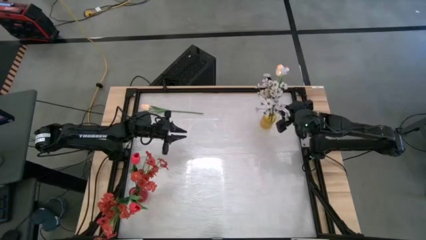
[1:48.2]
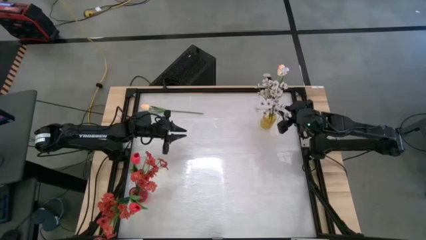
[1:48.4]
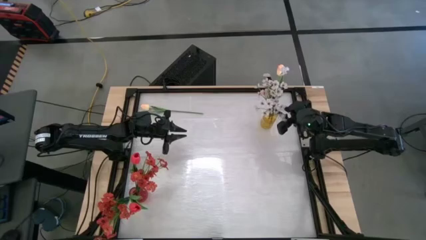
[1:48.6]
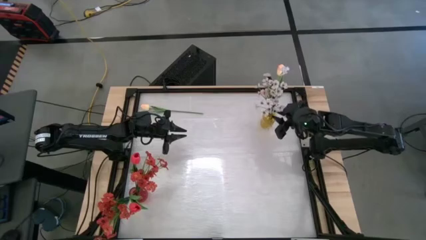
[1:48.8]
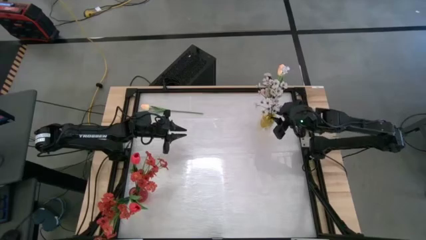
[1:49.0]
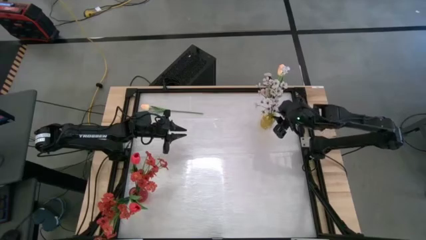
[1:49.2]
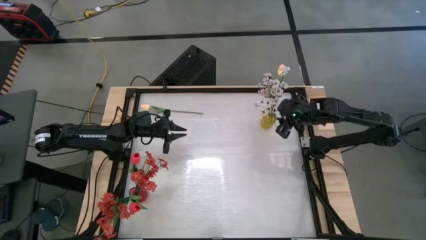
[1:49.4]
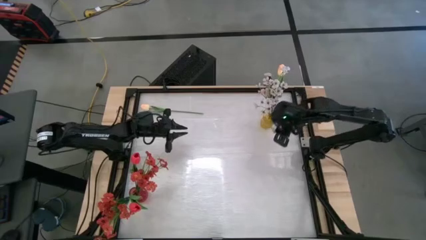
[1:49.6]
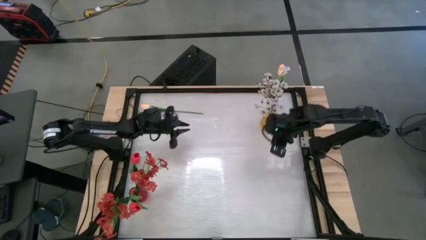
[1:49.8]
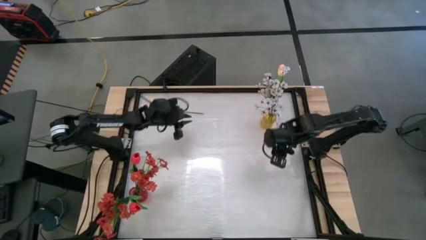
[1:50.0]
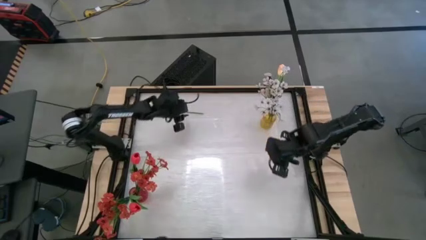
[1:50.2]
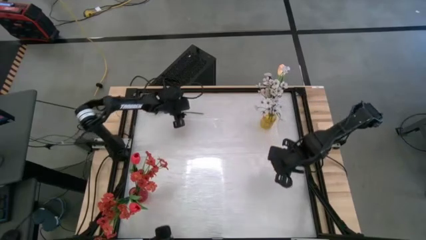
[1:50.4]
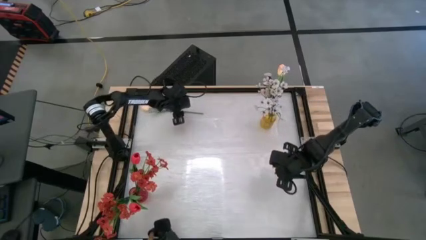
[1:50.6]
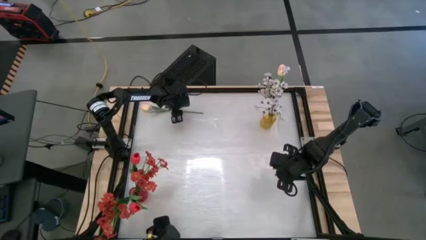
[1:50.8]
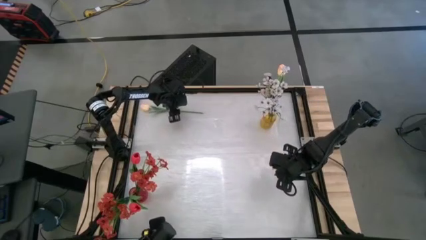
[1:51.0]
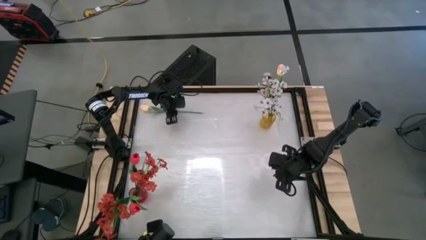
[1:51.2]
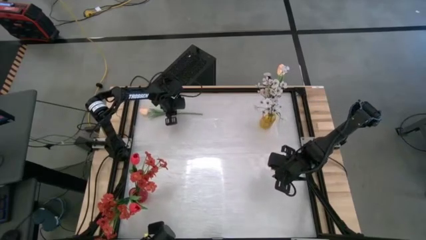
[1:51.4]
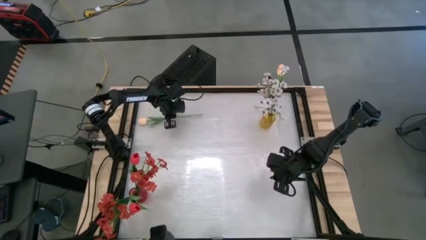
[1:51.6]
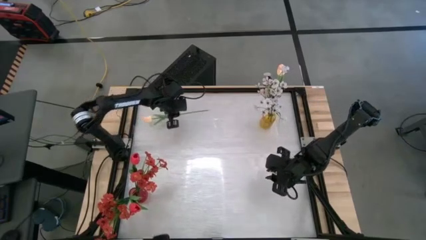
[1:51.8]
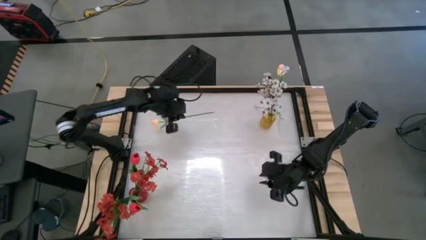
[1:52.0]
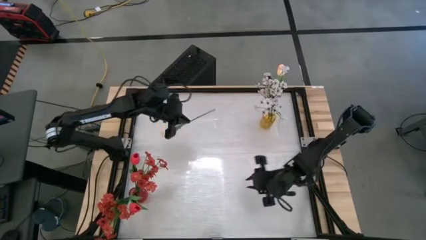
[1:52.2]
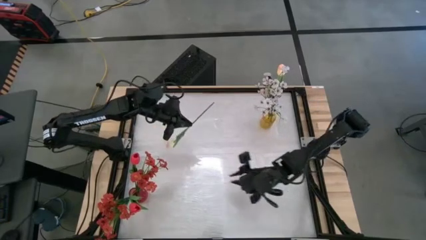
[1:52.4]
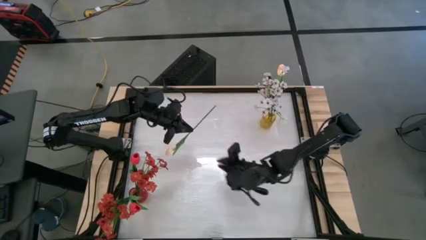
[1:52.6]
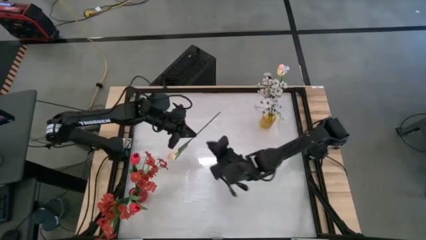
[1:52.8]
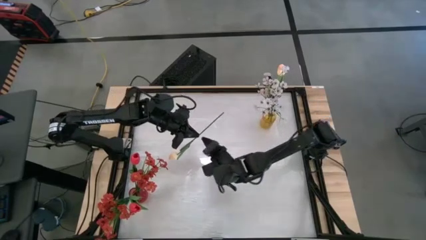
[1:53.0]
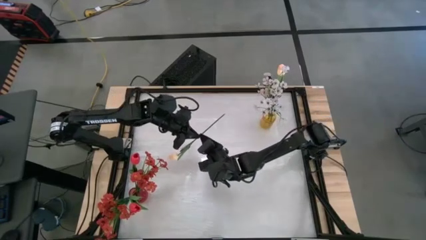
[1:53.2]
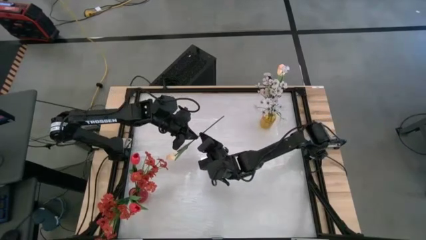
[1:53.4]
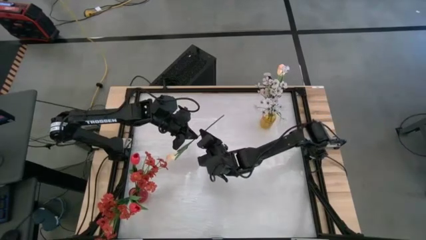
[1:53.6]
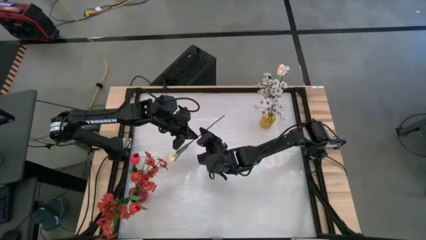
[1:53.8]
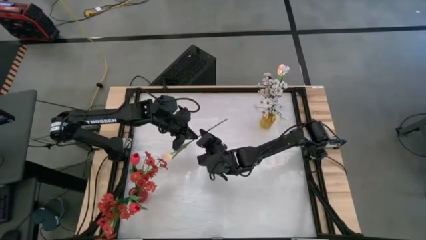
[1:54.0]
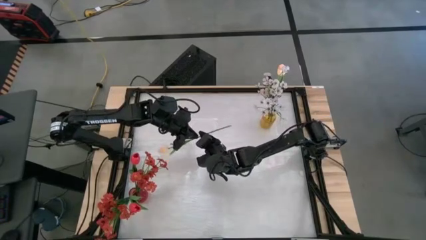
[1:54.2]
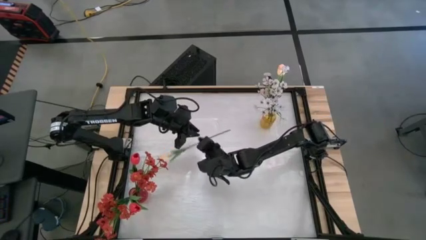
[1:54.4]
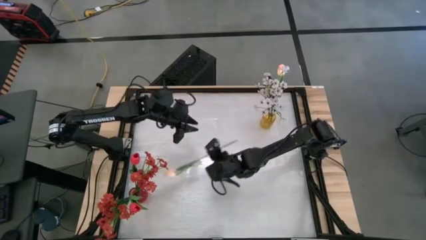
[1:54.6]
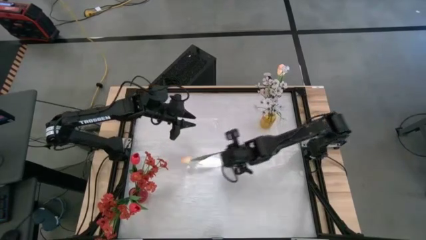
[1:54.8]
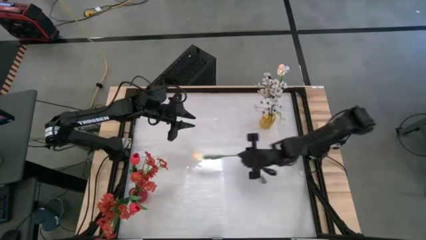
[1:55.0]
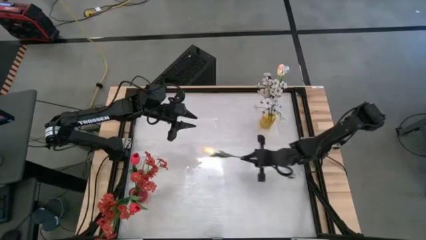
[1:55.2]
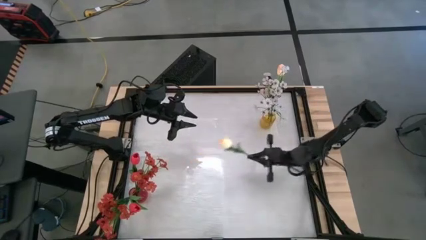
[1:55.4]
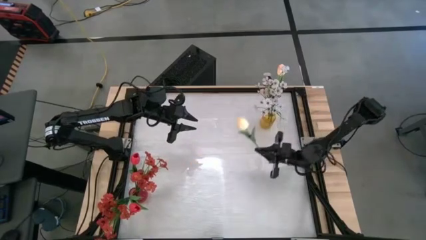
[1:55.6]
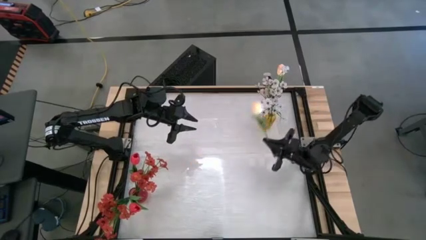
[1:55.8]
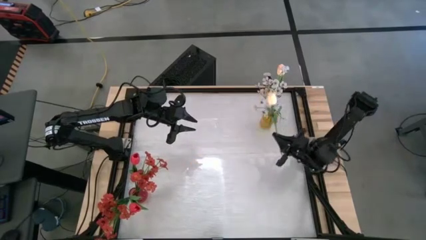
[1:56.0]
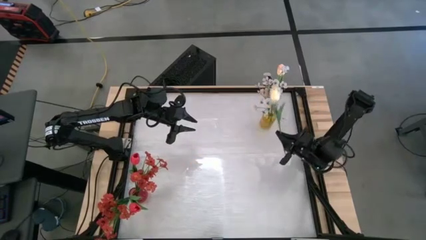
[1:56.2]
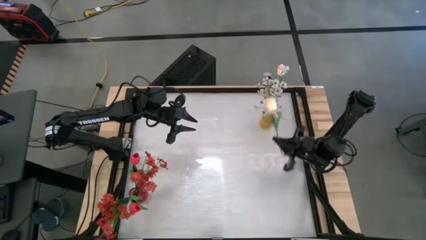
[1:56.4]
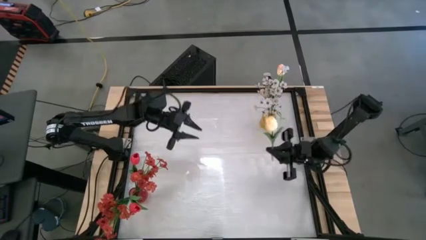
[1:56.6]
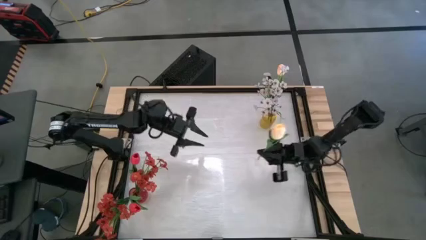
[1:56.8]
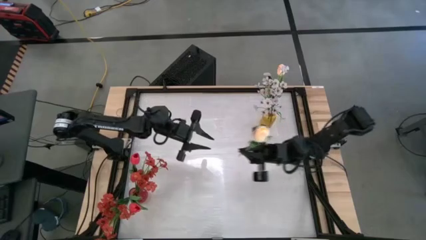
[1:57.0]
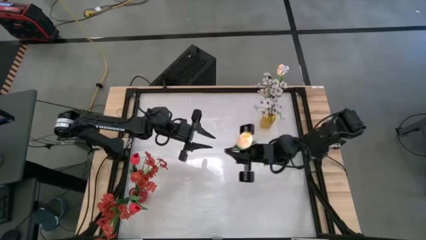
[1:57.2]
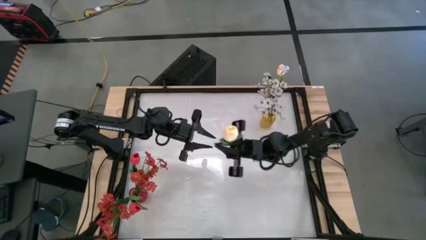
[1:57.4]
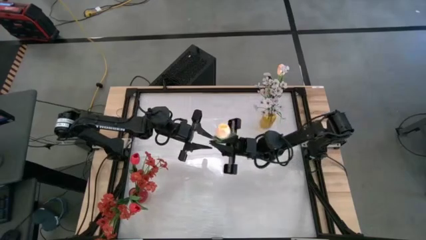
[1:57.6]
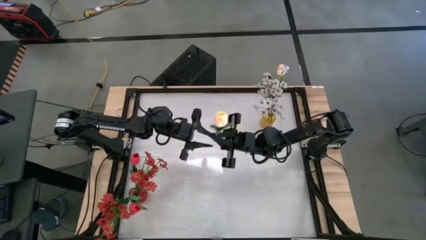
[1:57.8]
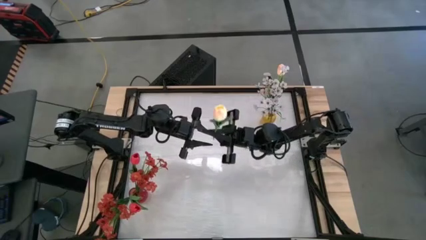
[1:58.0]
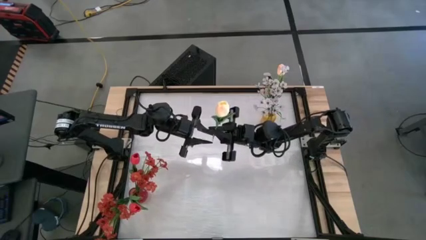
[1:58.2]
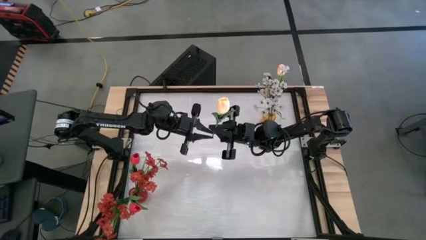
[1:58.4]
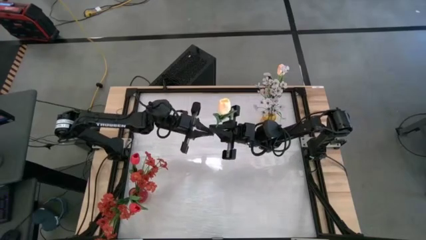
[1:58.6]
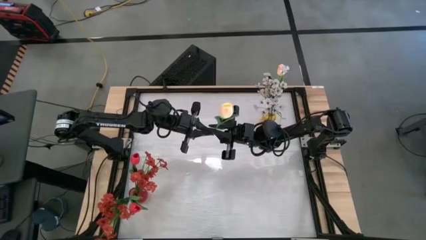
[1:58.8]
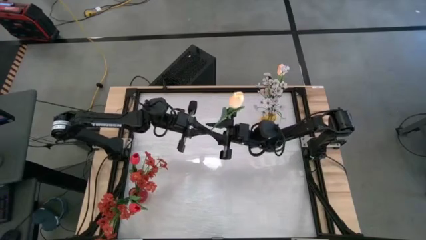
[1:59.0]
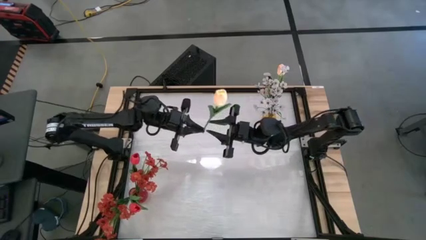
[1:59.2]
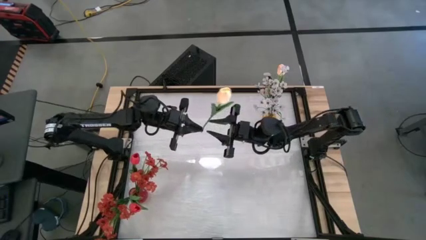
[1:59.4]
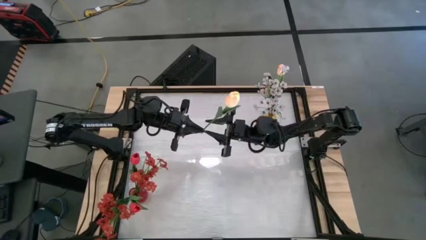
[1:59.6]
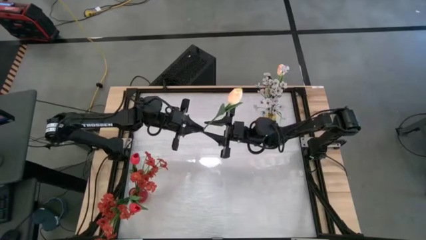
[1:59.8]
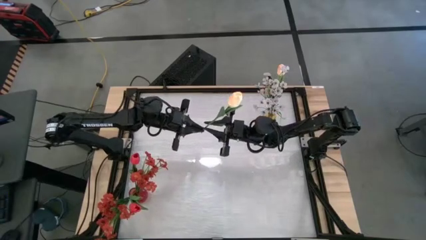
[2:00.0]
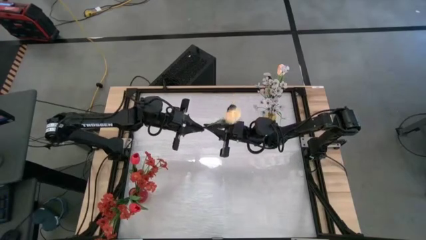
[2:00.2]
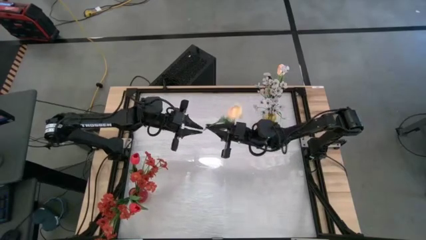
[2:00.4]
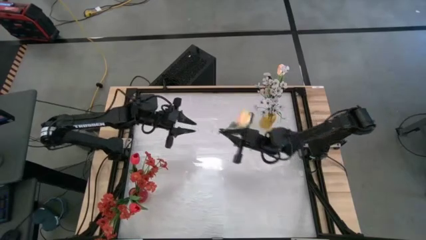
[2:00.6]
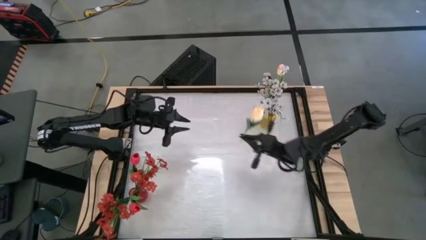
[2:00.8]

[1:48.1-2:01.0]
Task: Sort flowers into vase by color
Put the white tulip into the yellow vase
